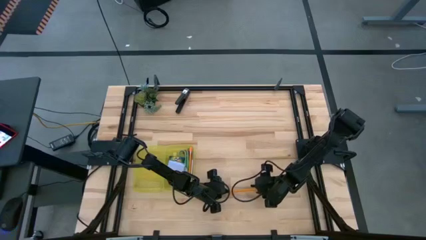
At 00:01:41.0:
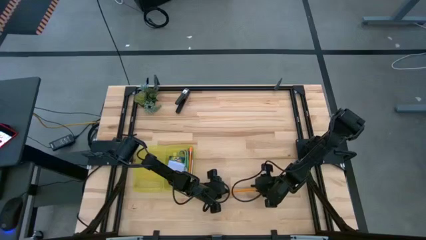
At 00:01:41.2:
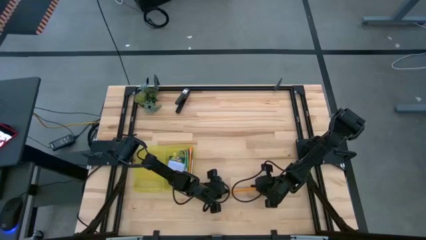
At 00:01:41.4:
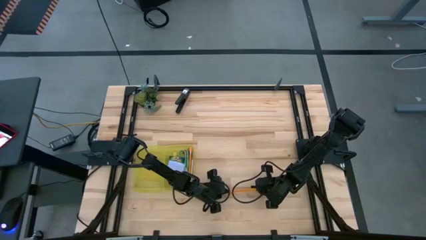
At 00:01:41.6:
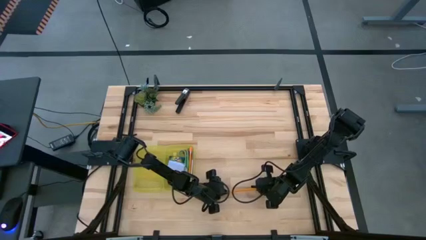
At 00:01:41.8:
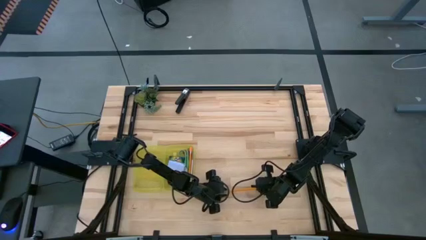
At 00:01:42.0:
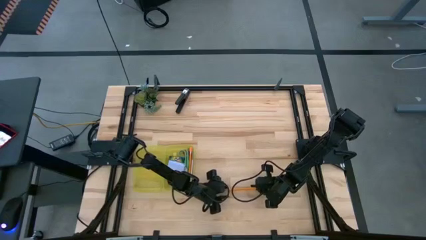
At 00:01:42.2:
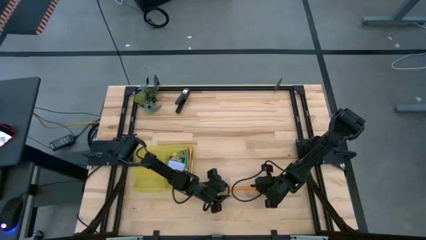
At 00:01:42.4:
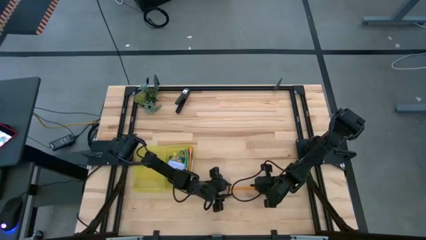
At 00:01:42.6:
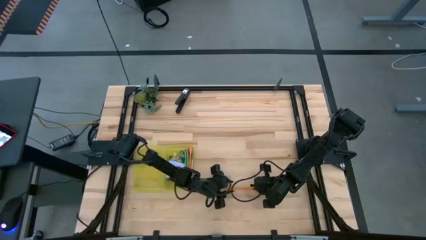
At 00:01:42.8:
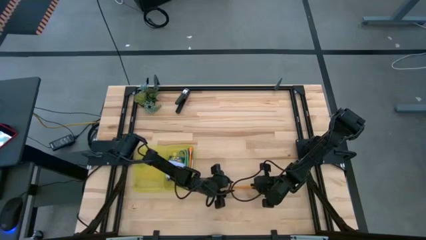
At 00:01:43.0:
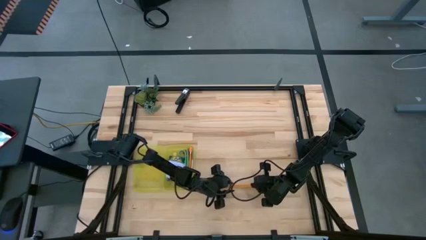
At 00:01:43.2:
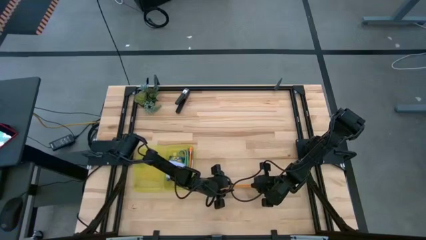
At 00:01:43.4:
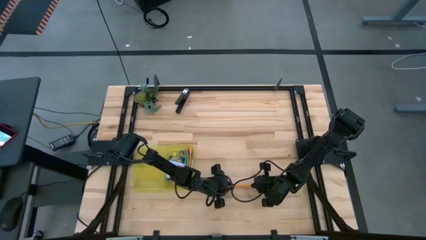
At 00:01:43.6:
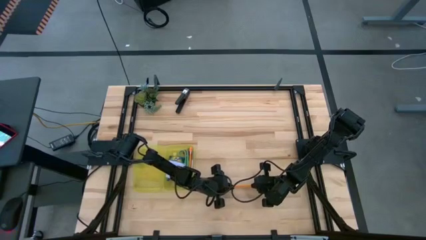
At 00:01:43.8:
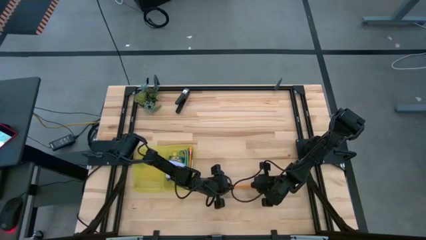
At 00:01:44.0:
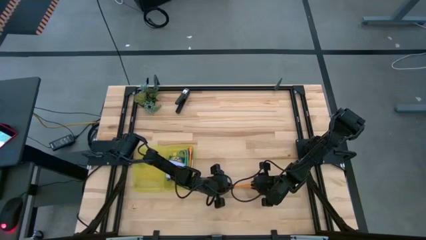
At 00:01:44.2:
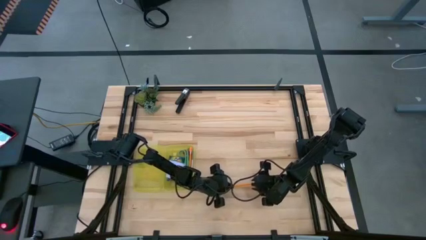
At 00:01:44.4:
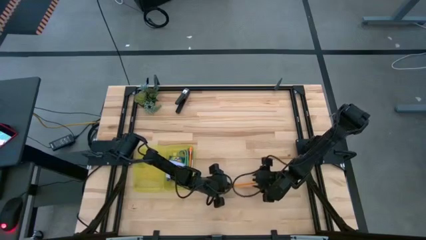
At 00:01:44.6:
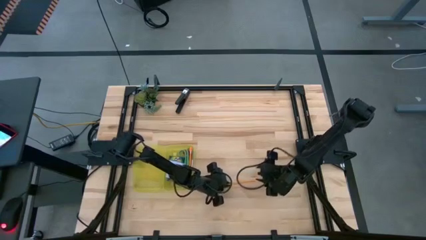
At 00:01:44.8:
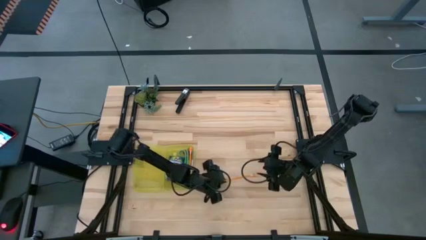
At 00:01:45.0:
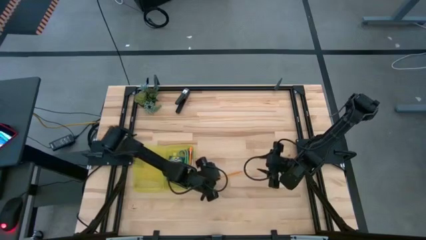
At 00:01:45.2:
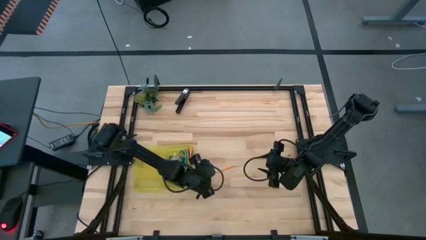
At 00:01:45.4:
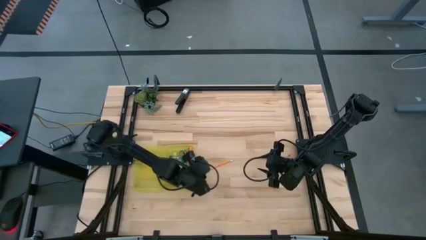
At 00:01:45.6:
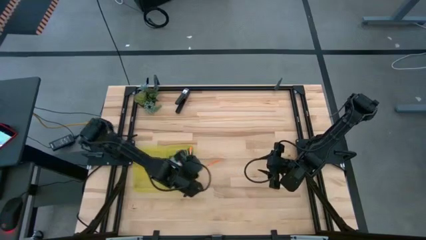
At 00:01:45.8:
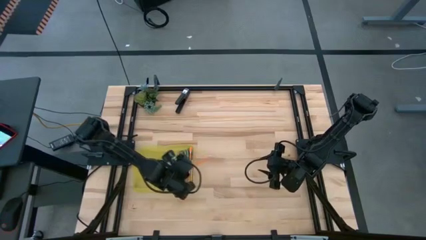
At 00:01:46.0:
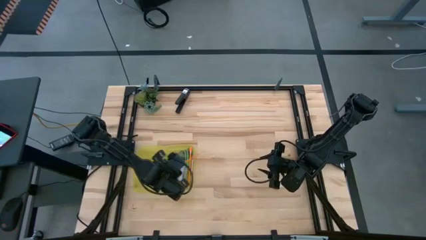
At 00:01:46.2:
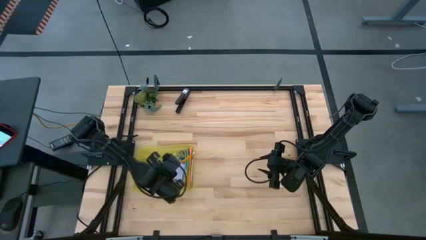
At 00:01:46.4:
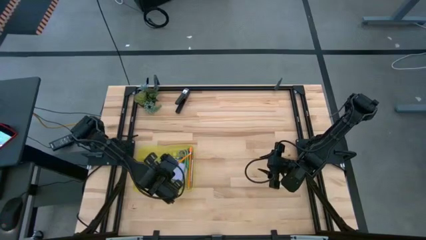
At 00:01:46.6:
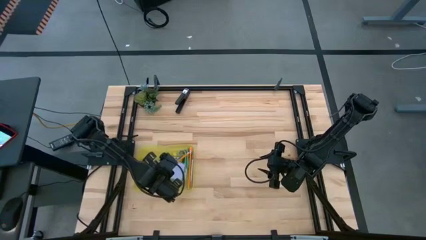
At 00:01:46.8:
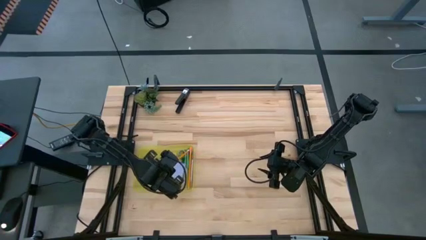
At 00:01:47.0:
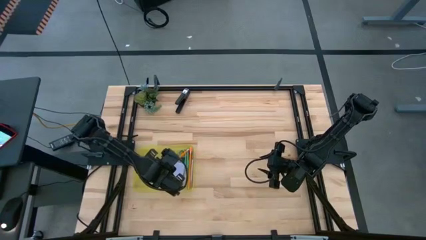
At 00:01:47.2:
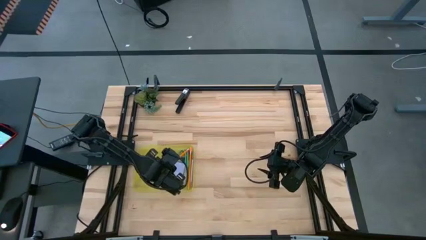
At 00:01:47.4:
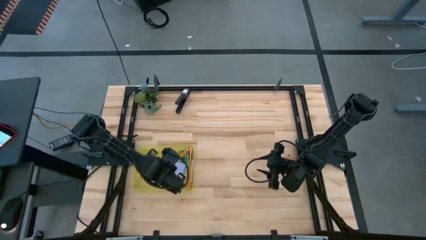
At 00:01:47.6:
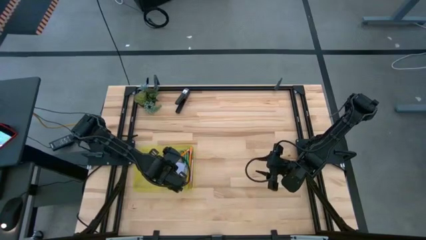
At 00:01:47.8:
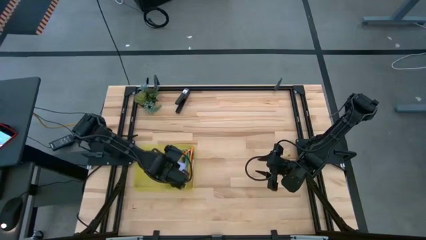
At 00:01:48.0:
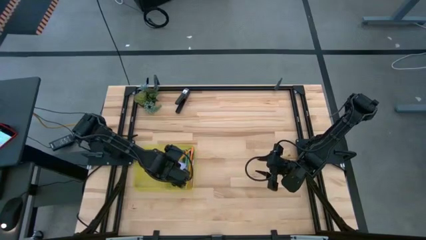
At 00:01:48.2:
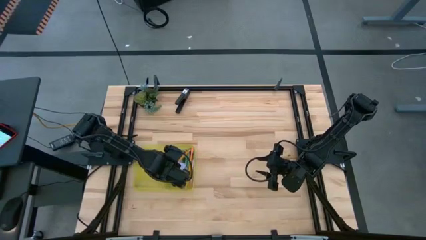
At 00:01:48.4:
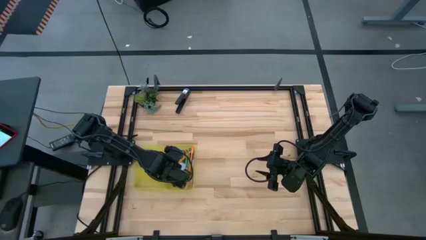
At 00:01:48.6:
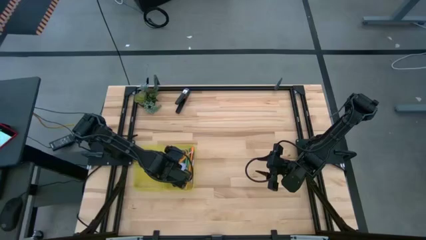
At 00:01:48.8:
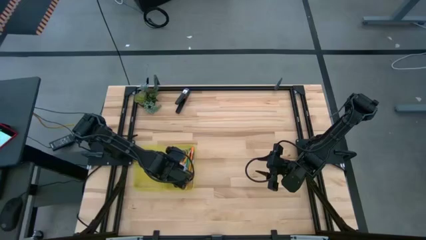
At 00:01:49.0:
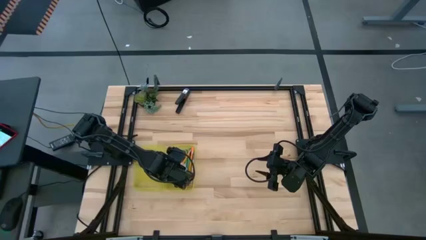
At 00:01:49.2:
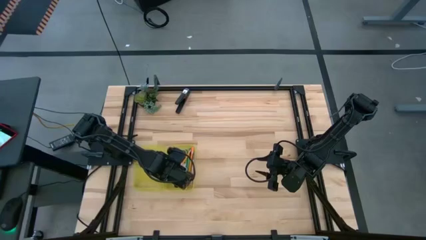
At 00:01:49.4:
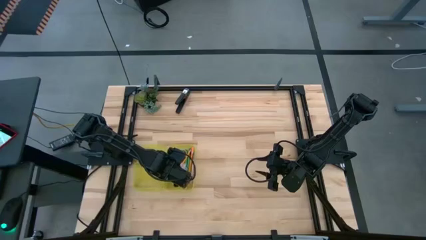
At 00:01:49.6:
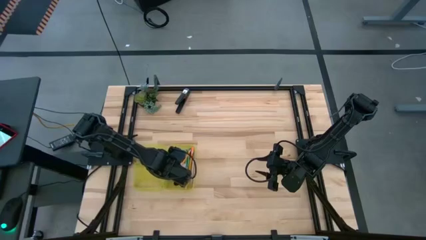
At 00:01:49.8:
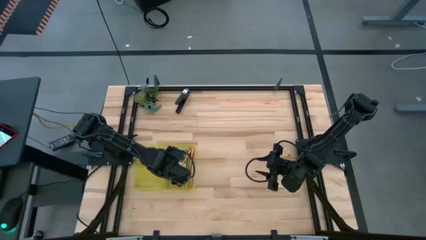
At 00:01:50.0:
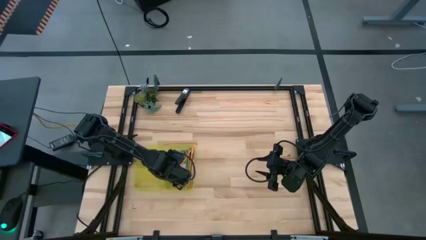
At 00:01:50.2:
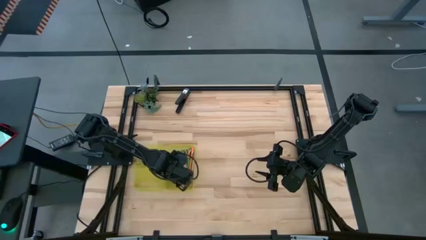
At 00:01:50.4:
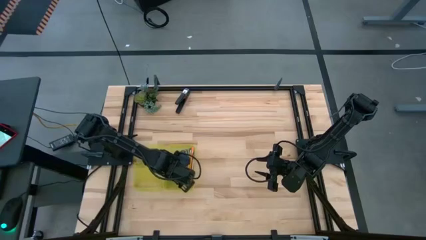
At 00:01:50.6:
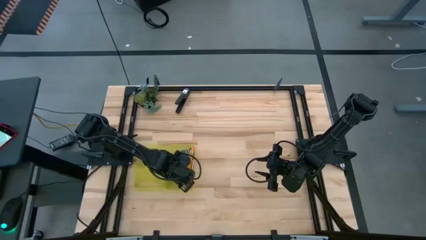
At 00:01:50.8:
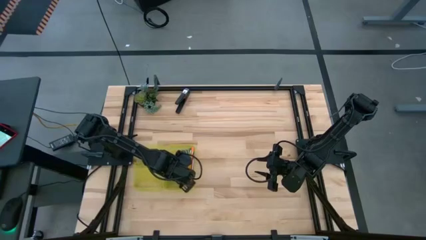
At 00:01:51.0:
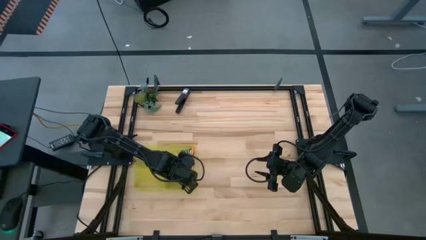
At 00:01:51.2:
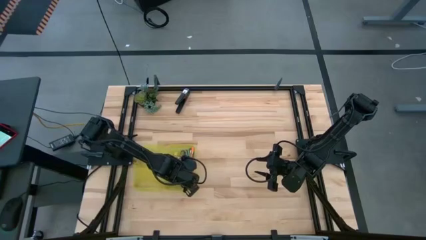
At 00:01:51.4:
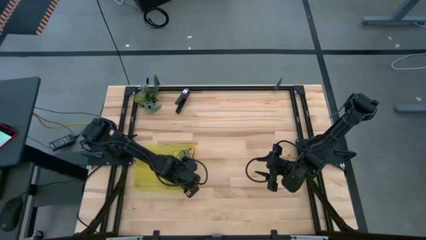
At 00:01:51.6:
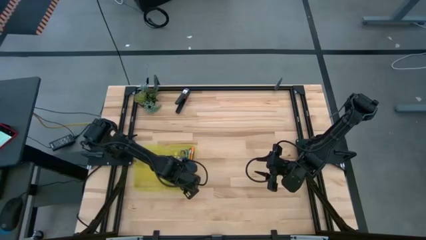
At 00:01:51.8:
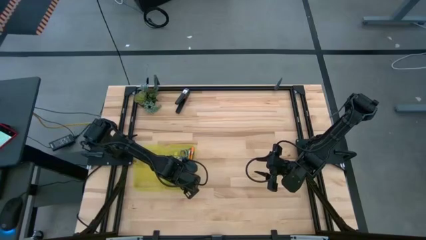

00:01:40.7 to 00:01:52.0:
Task: Pack school essentials
Put the orange pencil into the yellow pencil box

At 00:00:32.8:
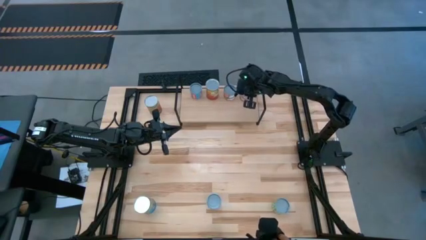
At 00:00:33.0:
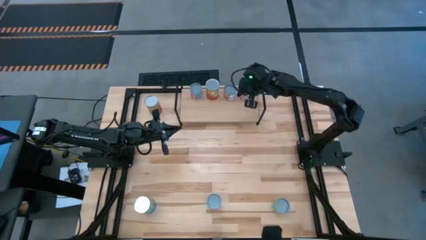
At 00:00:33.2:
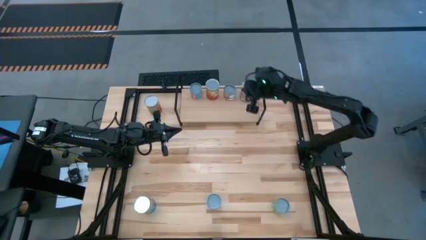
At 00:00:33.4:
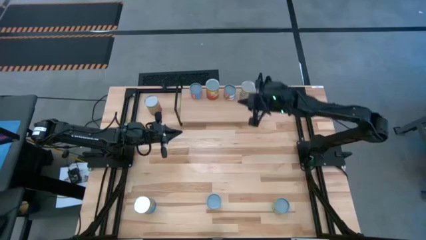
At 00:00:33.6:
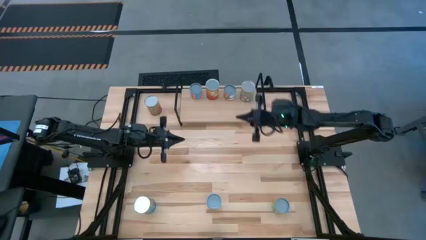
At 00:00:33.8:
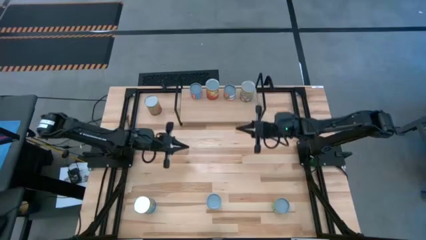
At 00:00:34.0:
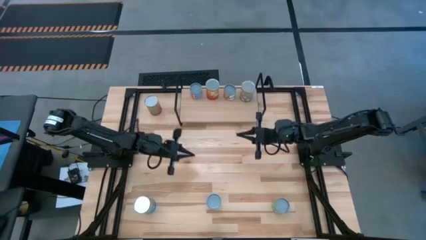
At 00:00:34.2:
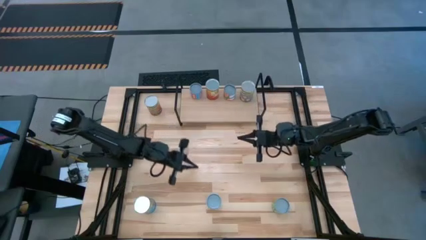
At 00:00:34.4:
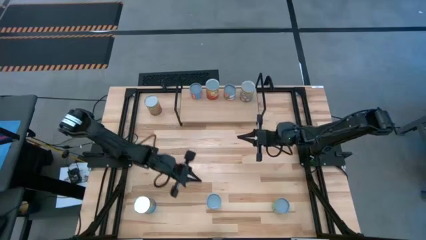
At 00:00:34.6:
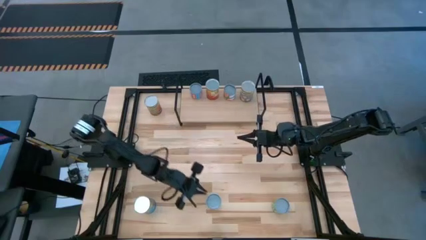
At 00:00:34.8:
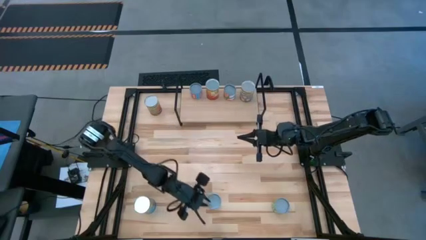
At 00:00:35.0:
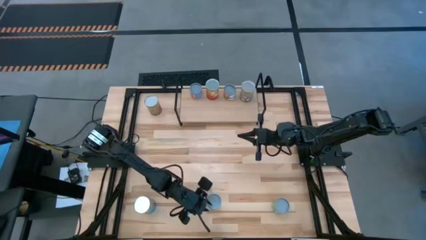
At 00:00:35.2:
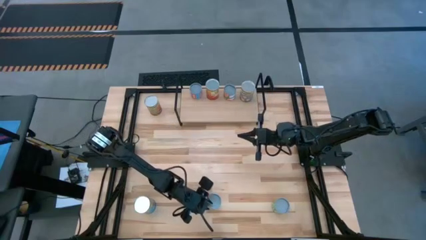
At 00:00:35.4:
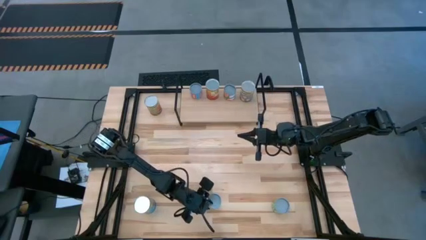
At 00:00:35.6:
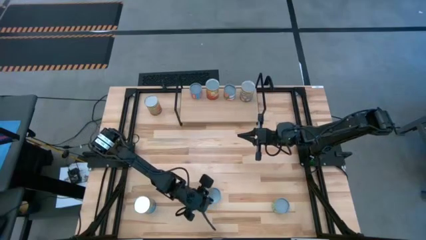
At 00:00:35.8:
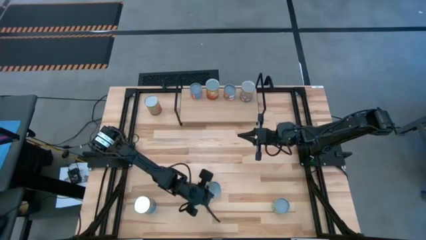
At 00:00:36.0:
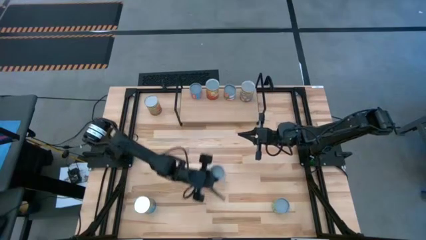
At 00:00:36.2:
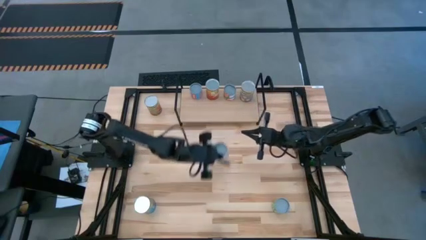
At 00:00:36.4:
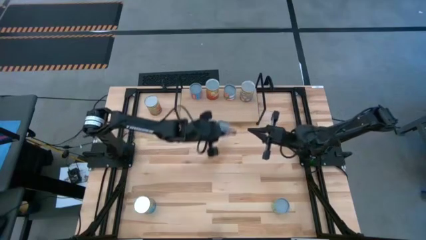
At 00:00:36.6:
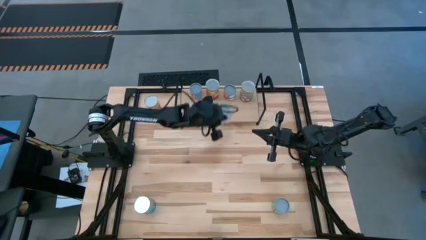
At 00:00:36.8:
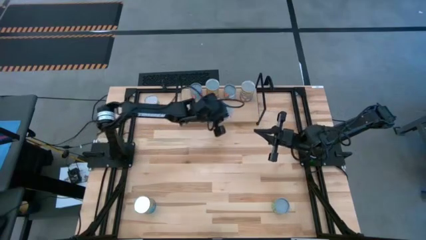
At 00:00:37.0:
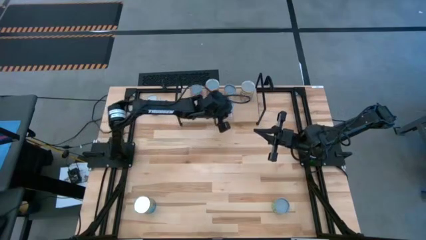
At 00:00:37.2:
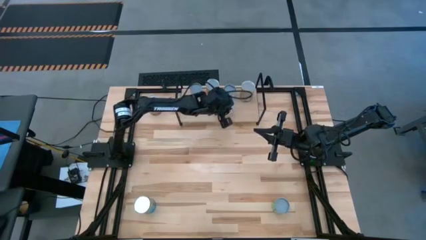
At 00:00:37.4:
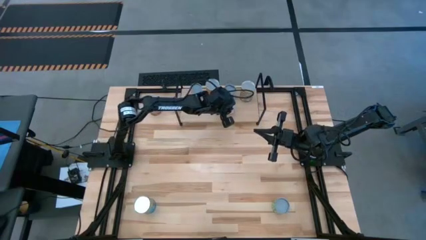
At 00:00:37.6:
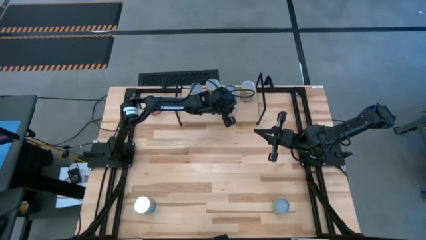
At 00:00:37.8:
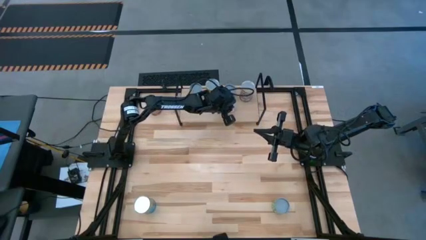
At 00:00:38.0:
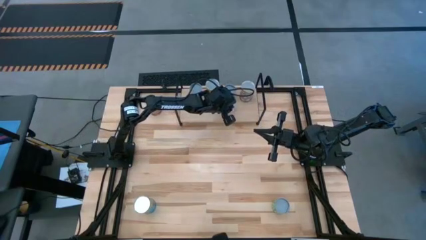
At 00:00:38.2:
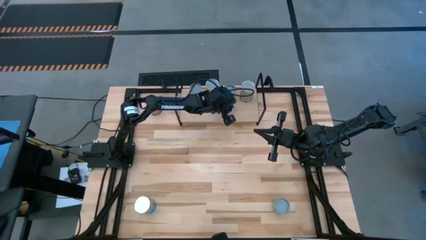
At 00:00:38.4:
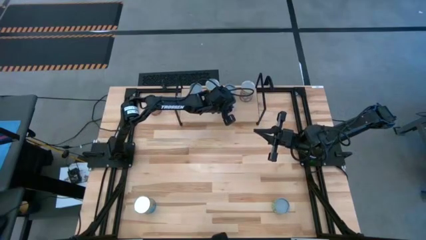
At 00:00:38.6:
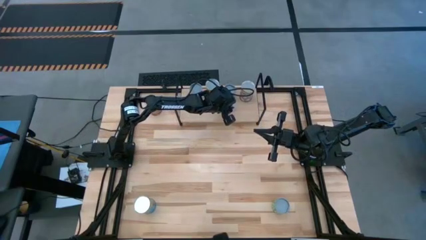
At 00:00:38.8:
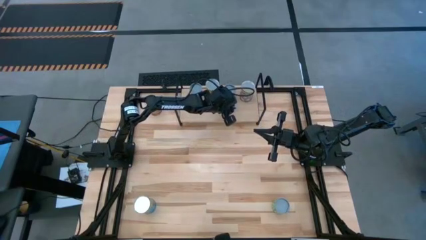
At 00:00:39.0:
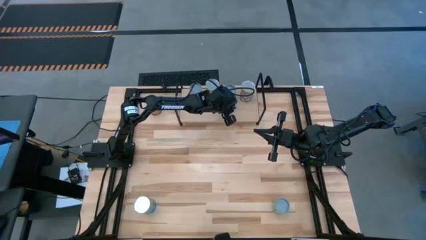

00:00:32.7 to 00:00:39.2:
Task: Pick and place cans onto a shelf
Put the white can on the shelf aligned with the other green can
